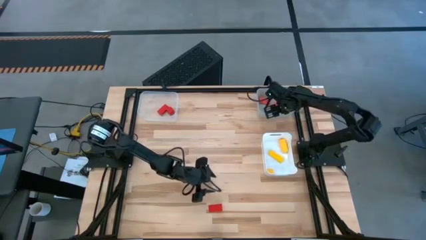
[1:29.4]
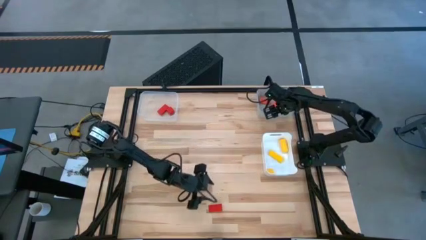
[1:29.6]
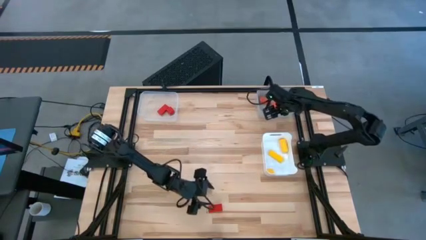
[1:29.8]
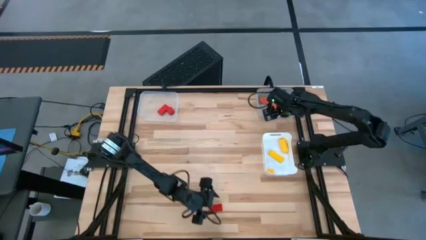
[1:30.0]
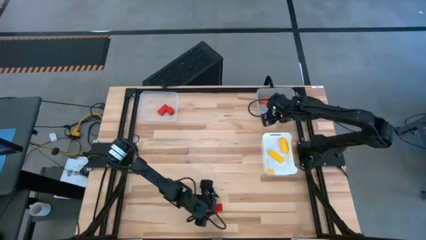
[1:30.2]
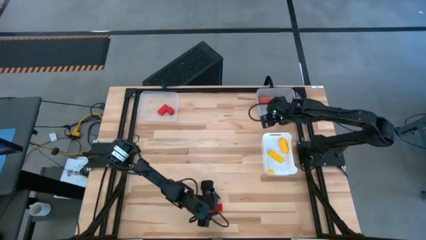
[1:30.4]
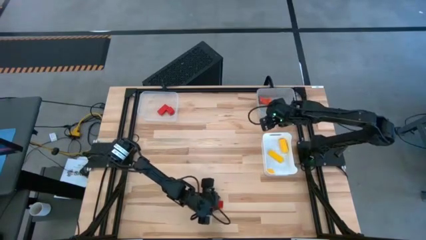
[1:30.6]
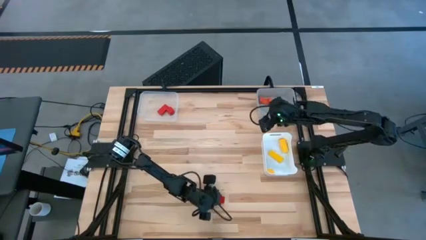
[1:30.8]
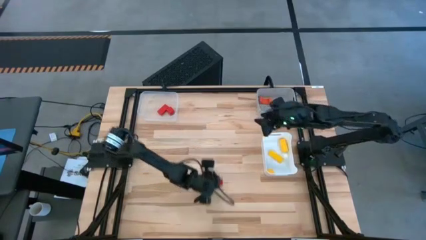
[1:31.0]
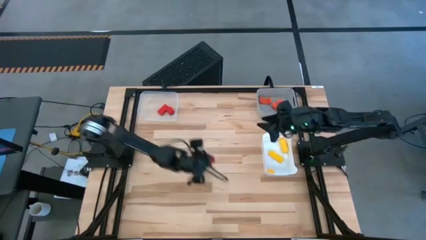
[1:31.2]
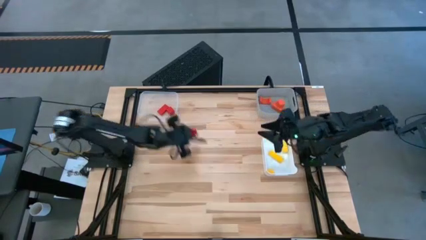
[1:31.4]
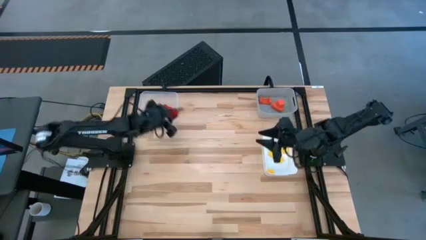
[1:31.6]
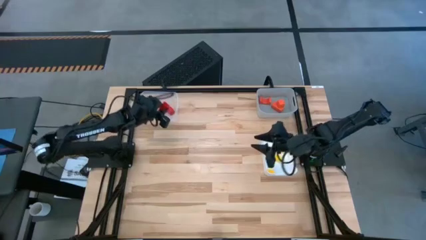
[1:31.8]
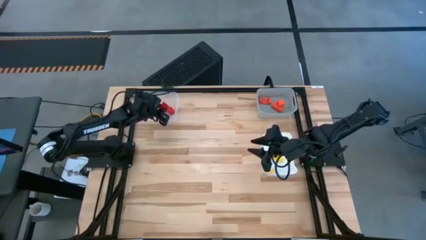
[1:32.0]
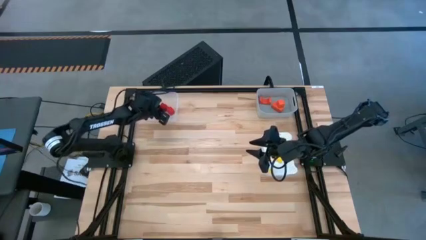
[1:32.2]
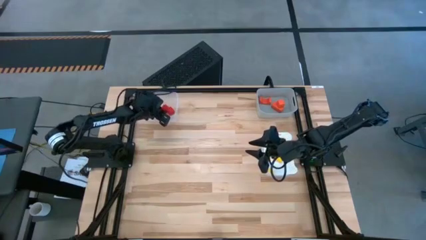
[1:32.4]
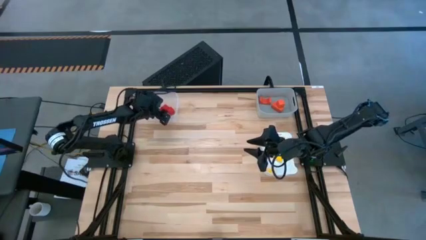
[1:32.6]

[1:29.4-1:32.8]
Task: Sort & place blocks by color
Put the red block into the transparent bin

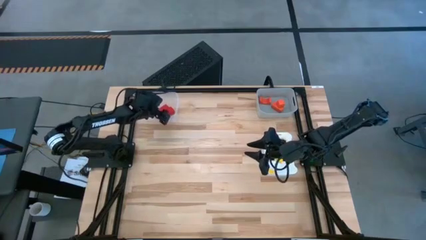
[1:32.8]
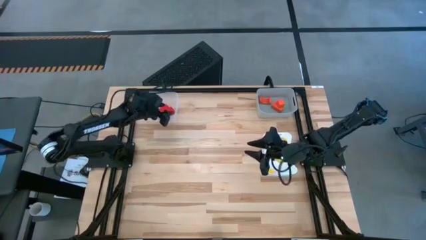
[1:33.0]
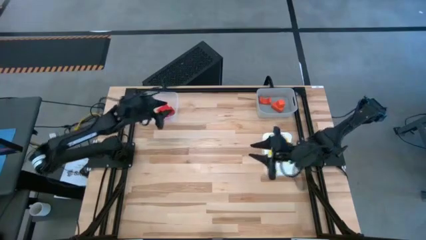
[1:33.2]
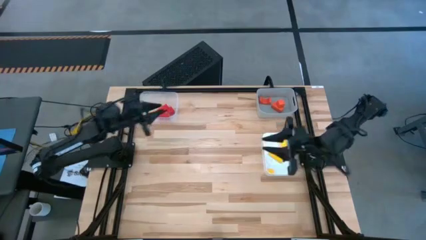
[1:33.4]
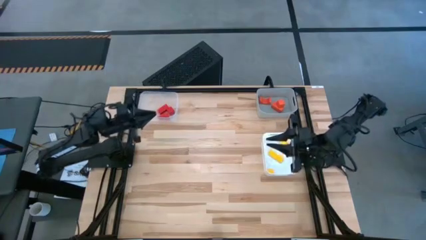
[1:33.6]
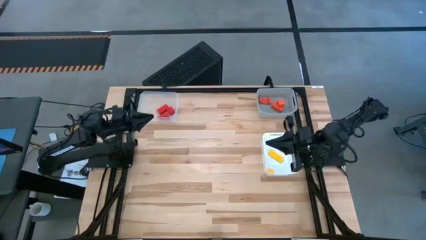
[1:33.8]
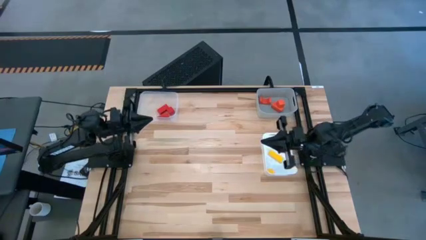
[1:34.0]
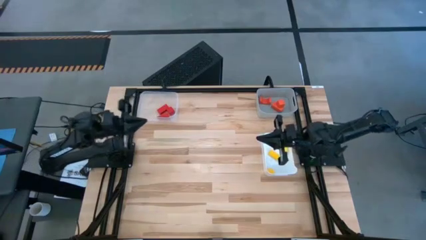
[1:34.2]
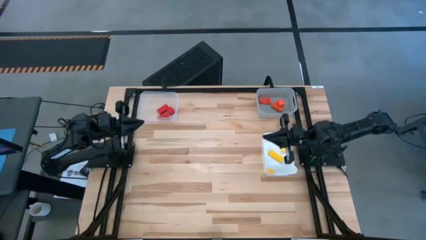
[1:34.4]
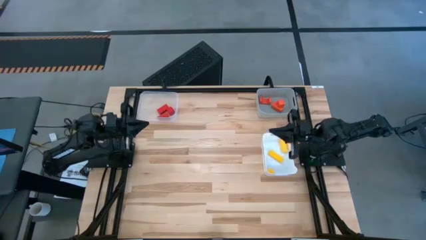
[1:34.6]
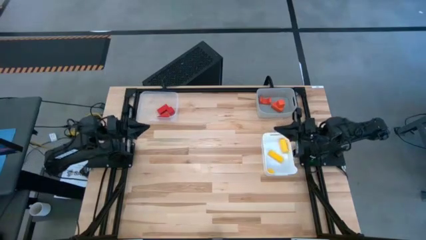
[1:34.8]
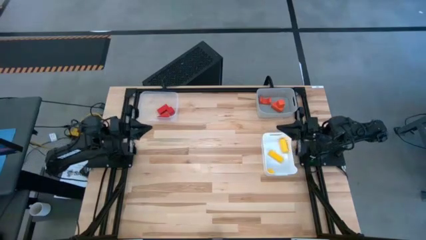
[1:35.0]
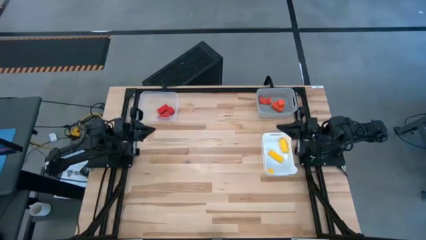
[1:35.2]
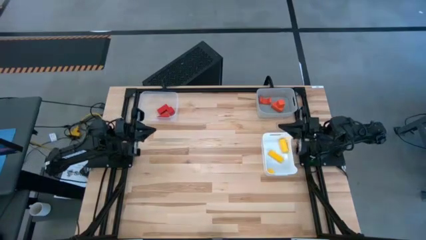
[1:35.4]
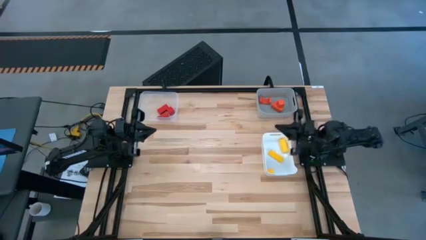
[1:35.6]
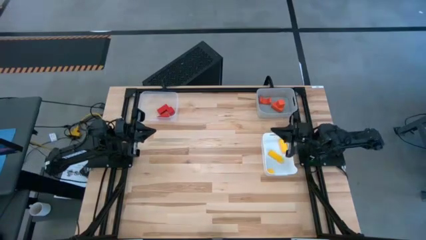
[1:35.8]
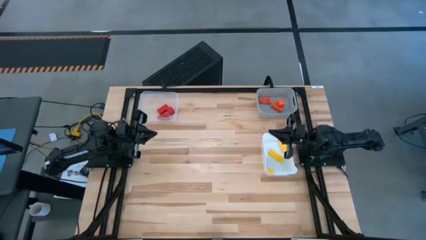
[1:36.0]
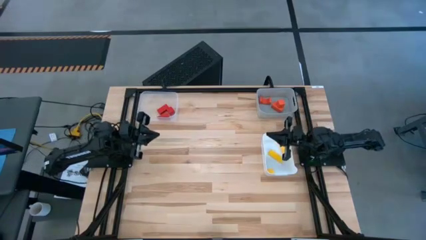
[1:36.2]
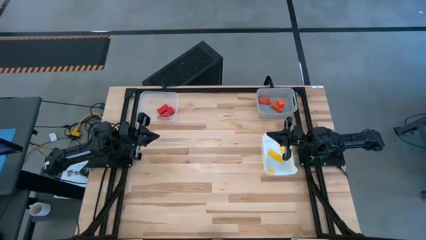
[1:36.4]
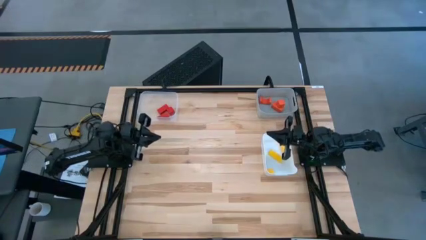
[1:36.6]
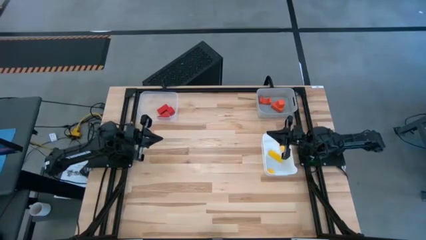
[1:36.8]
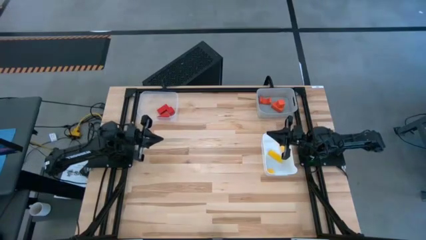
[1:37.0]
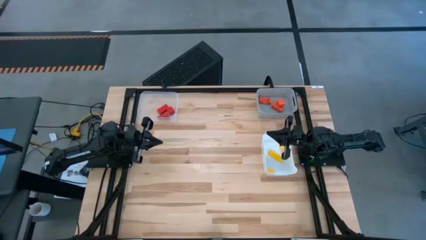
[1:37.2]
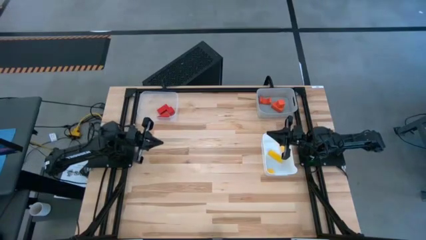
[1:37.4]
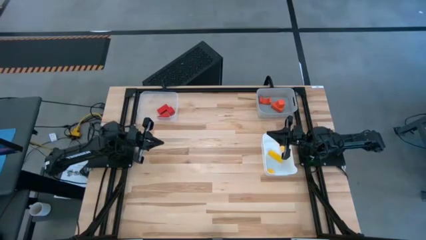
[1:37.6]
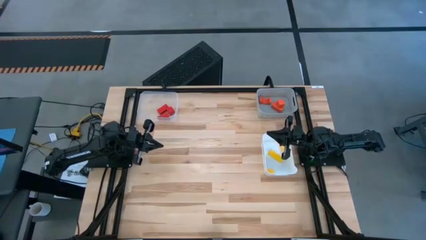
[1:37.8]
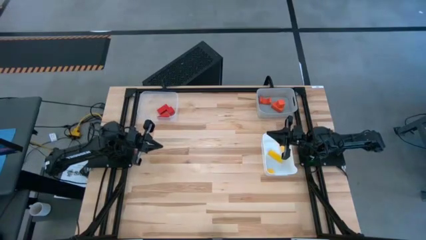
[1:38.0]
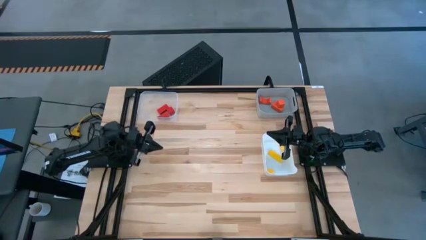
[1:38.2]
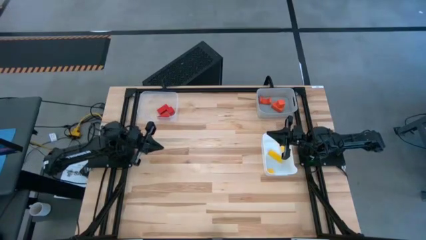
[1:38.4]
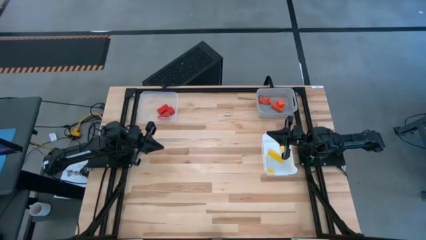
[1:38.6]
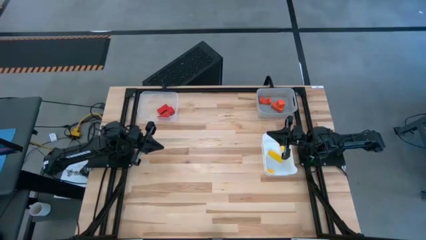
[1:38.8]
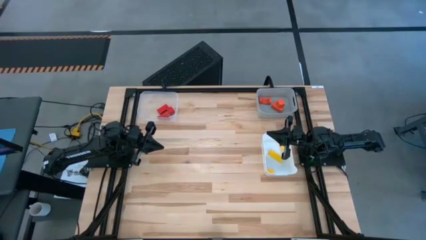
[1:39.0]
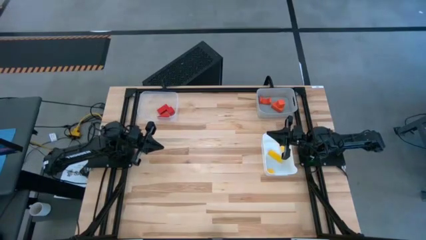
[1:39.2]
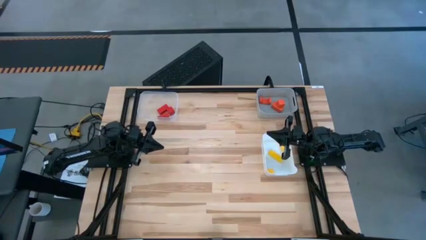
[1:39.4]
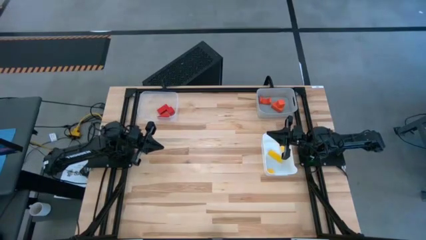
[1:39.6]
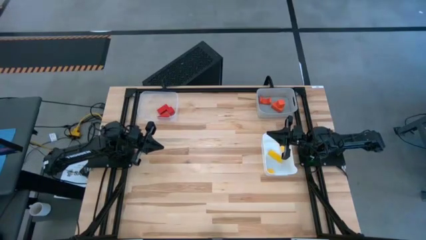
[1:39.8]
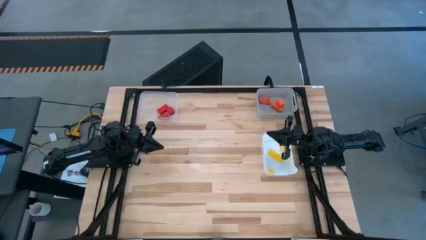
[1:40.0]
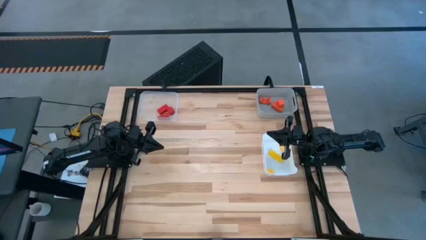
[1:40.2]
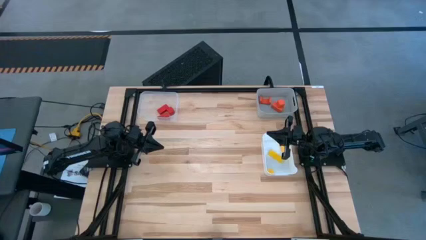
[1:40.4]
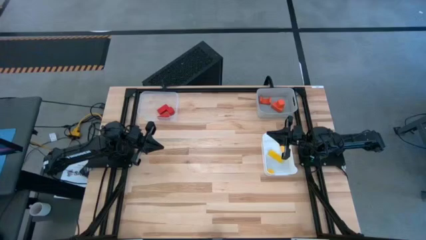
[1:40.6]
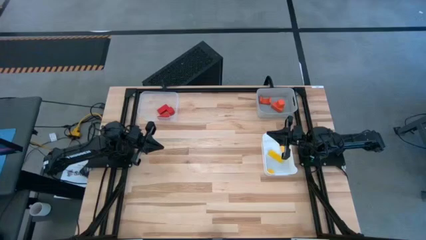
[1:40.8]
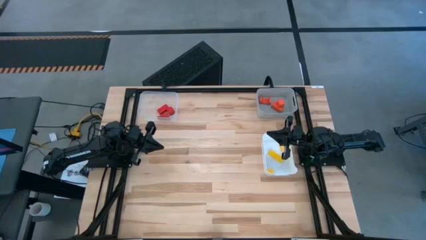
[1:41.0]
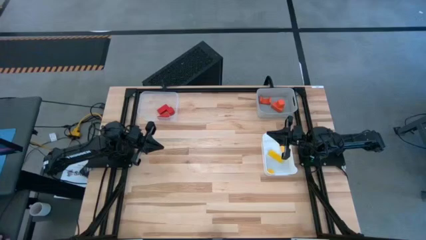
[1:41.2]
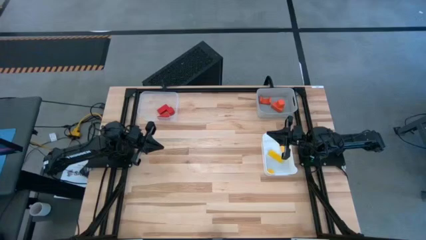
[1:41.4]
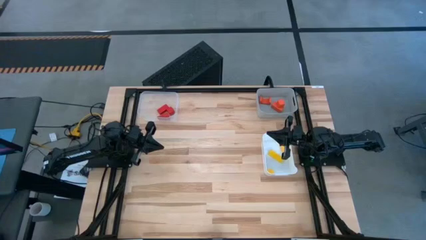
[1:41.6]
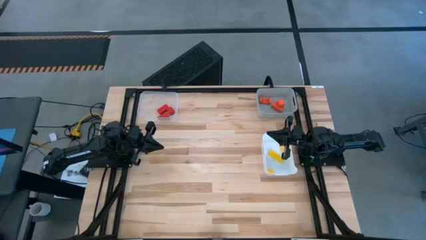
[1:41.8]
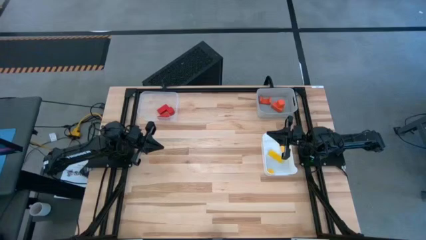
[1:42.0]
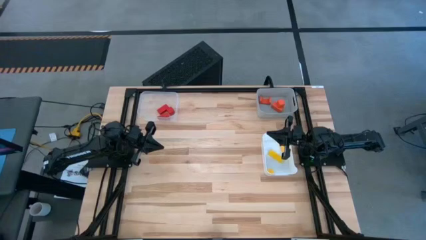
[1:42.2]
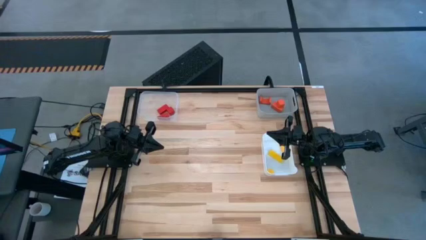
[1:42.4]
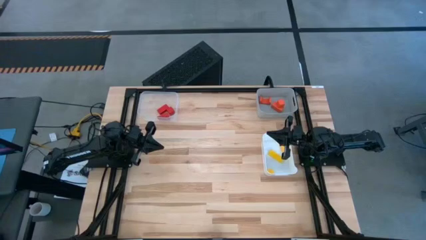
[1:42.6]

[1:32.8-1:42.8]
Return to Home Position

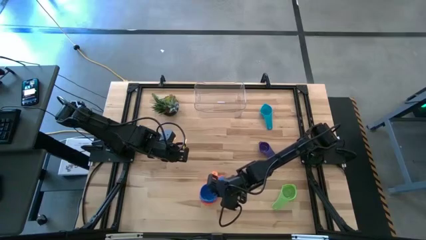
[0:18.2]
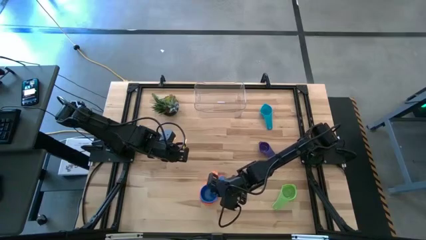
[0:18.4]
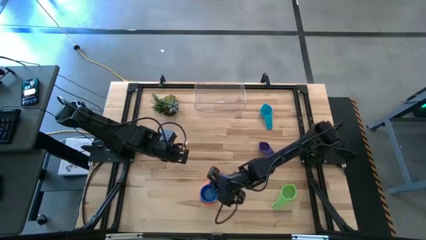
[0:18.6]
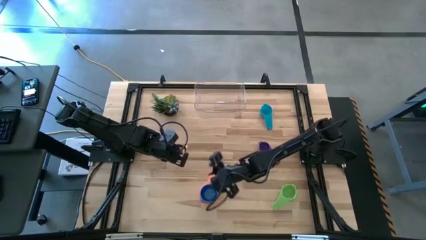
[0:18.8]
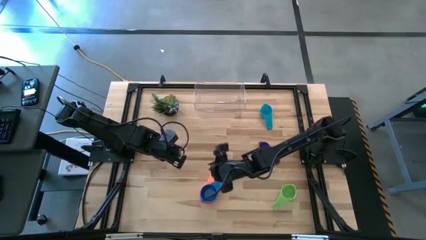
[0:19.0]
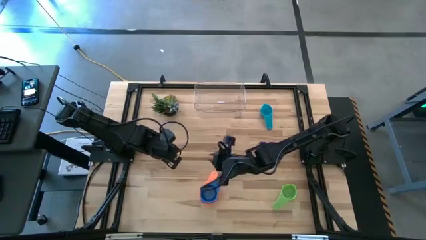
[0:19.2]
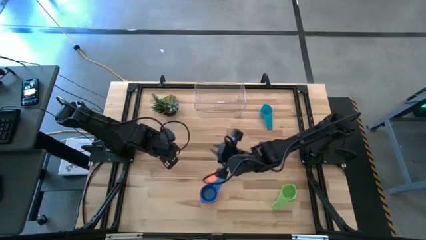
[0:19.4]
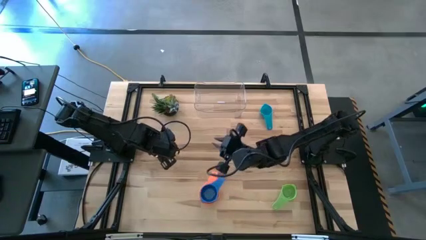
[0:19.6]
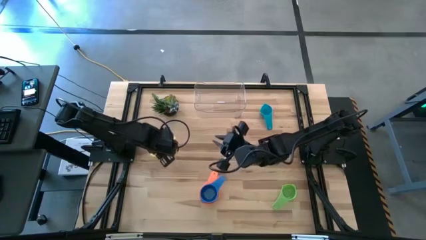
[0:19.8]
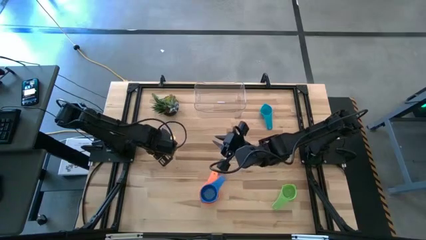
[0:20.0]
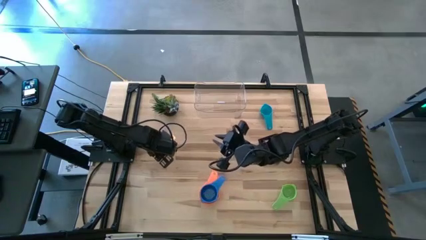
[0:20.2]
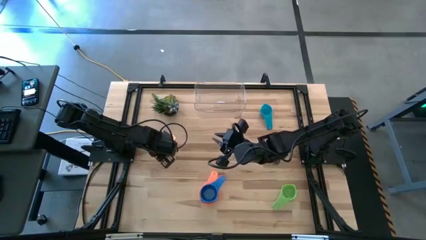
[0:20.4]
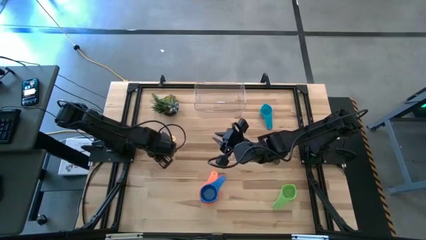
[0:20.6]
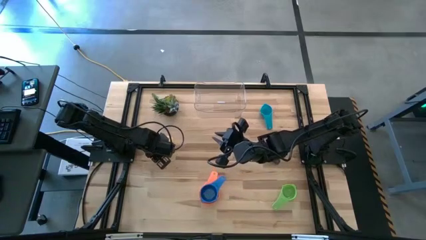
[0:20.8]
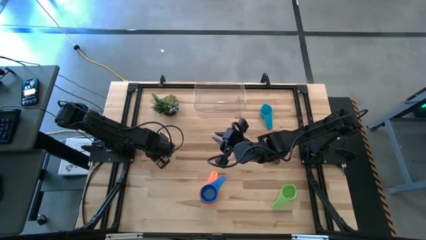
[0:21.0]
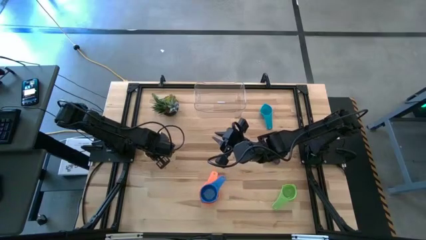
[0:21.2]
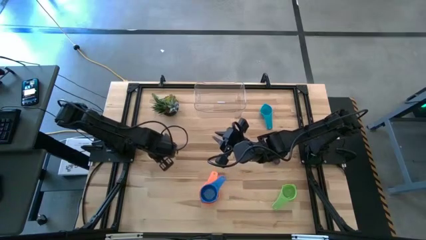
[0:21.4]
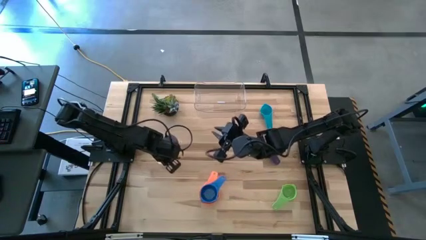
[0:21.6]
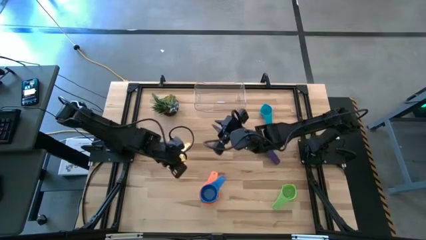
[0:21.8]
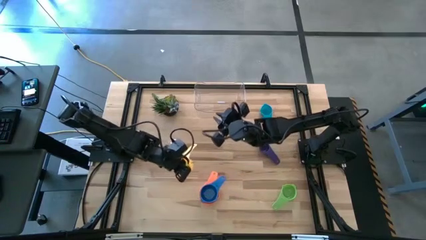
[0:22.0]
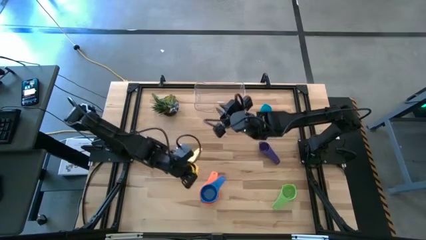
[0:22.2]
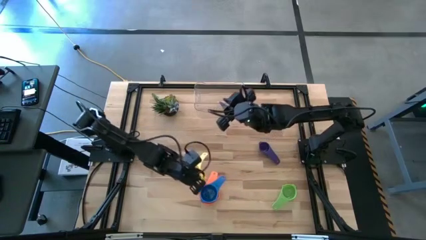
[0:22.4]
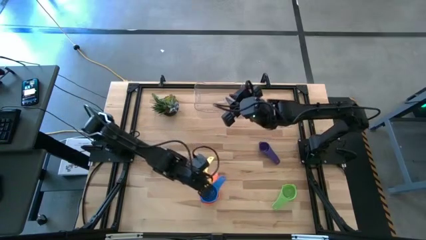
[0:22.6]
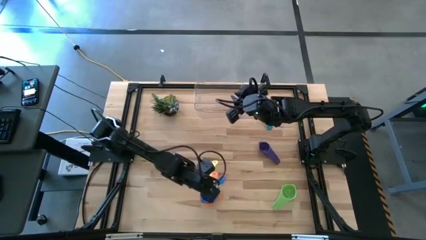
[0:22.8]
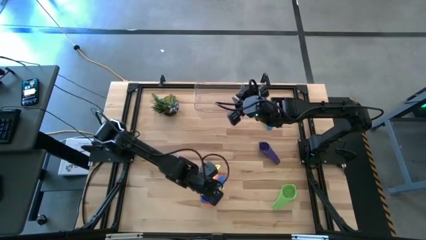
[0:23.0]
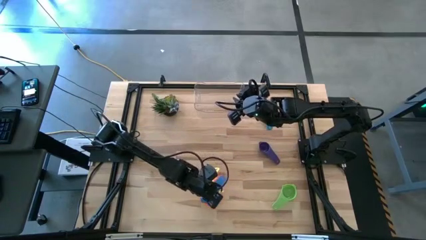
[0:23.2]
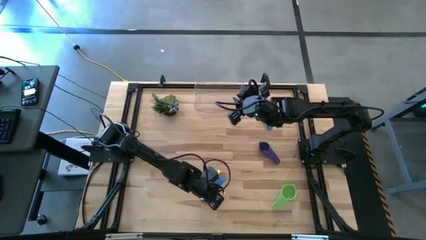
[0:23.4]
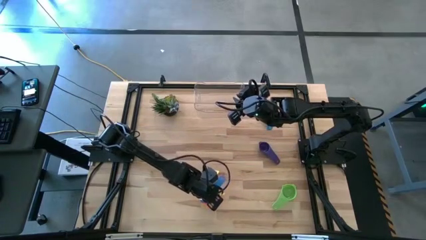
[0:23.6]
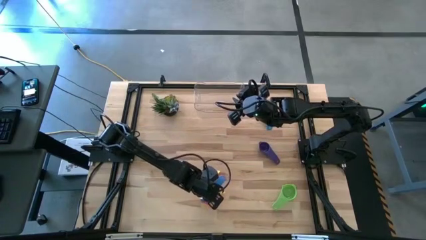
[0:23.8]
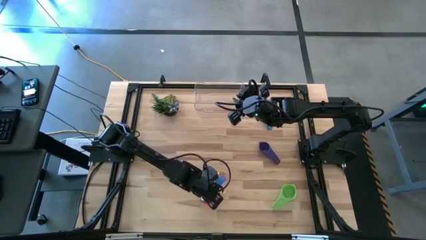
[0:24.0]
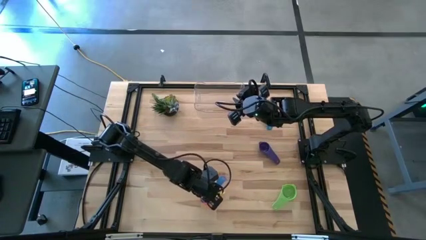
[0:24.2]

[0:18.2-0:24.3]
Task: Nest measuring cups in basket
Stack the yellow measuring cup on the blue measuring cup
